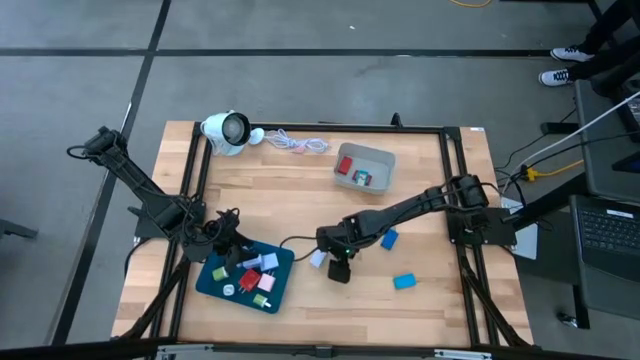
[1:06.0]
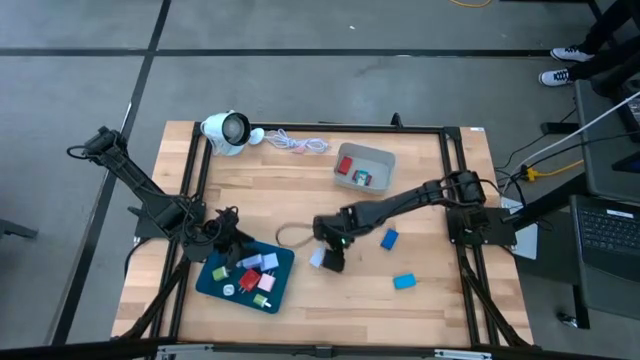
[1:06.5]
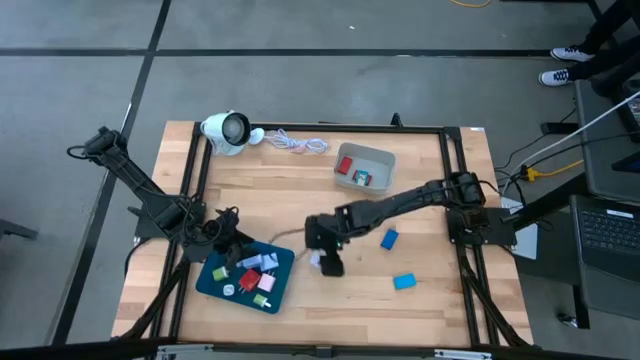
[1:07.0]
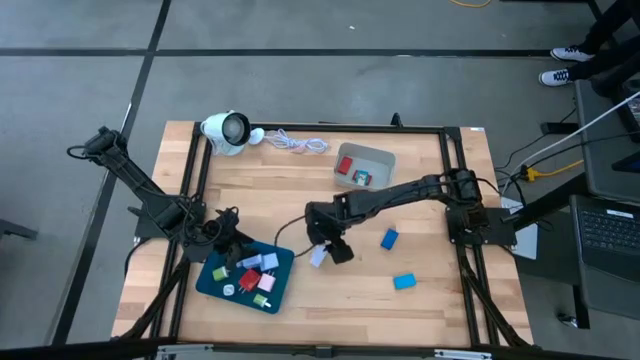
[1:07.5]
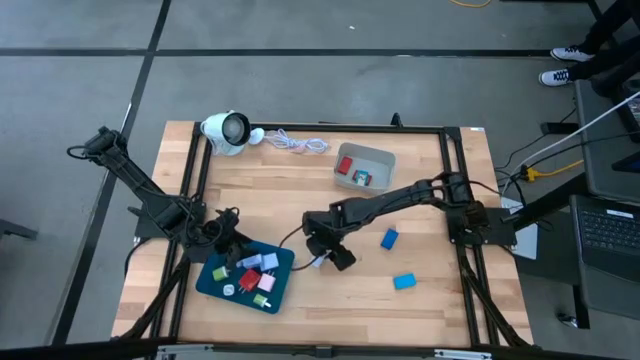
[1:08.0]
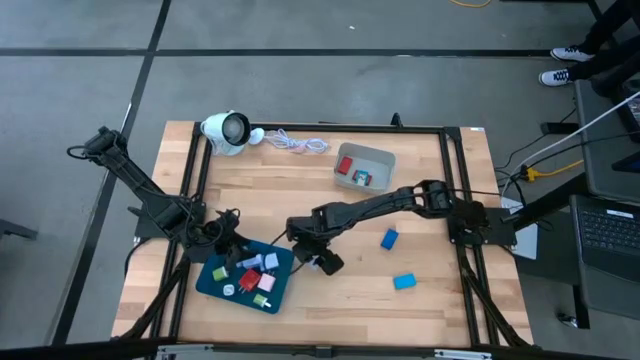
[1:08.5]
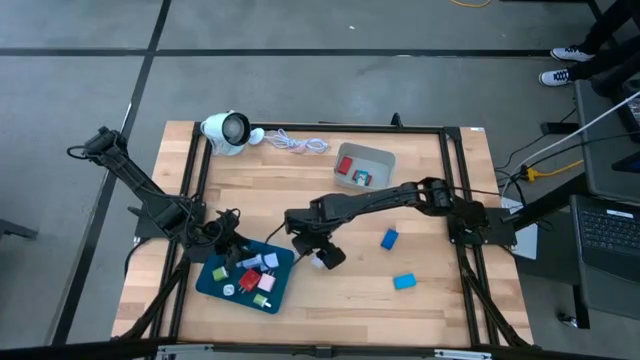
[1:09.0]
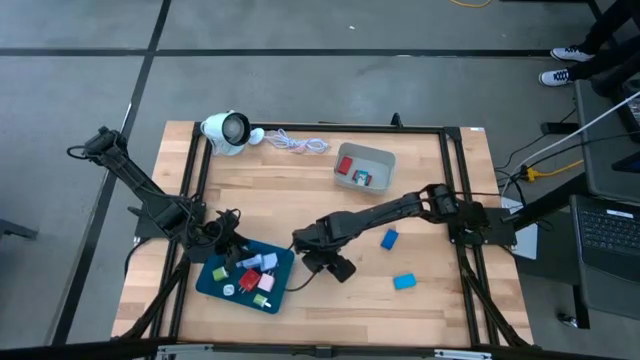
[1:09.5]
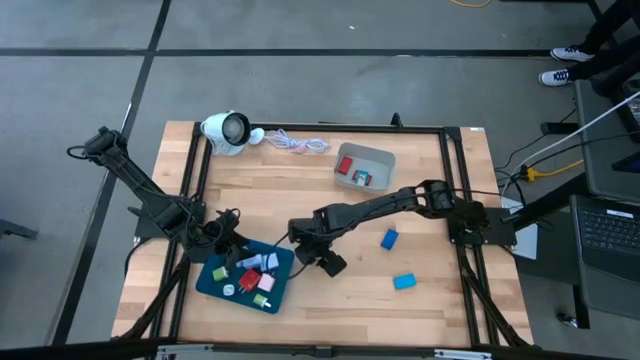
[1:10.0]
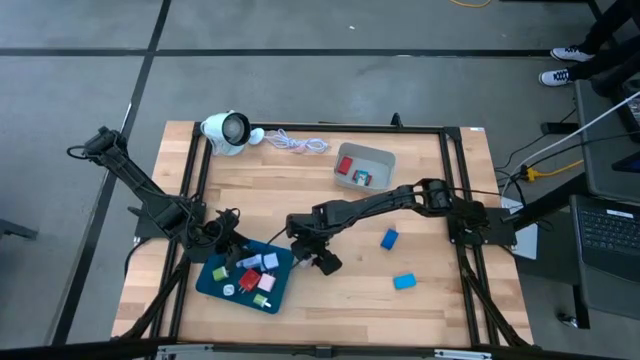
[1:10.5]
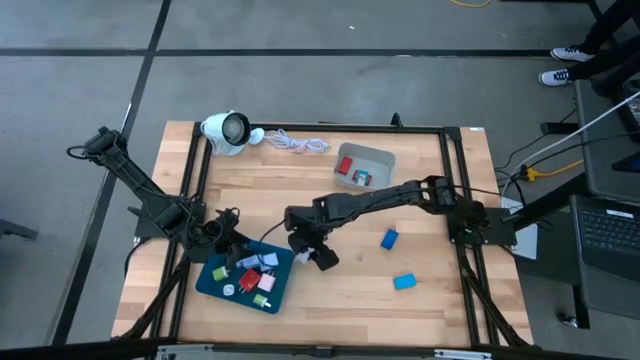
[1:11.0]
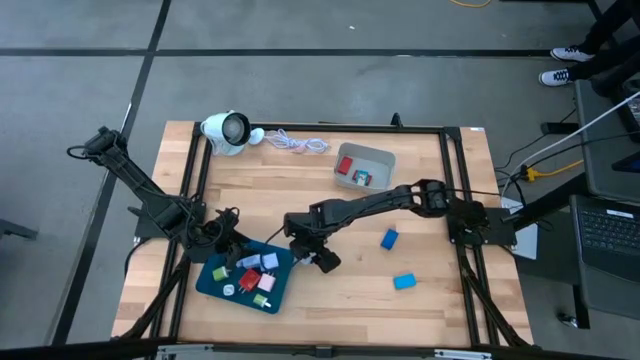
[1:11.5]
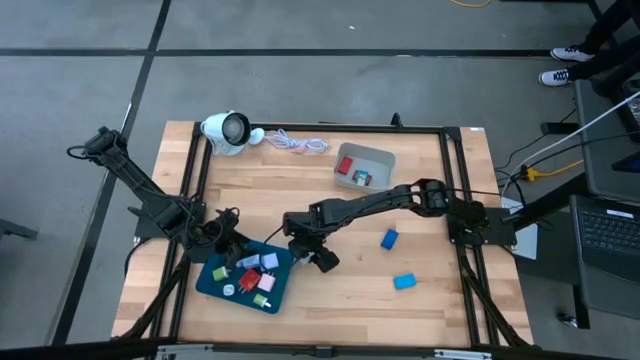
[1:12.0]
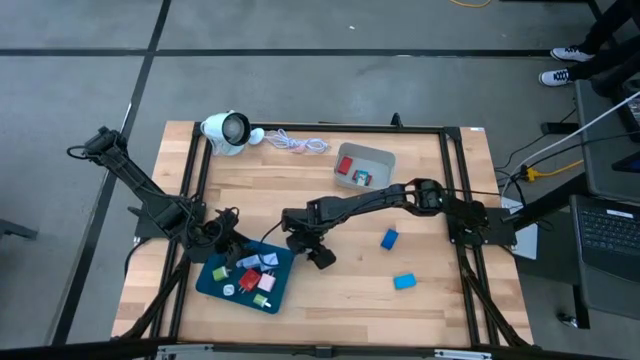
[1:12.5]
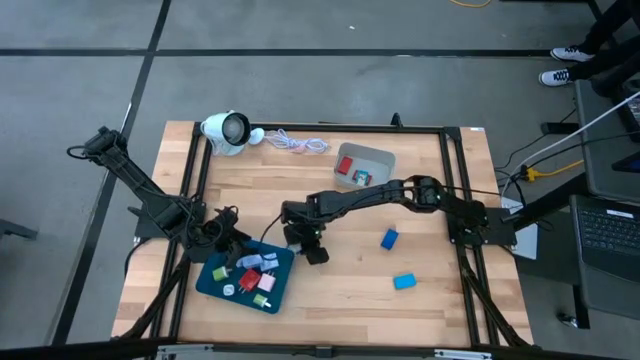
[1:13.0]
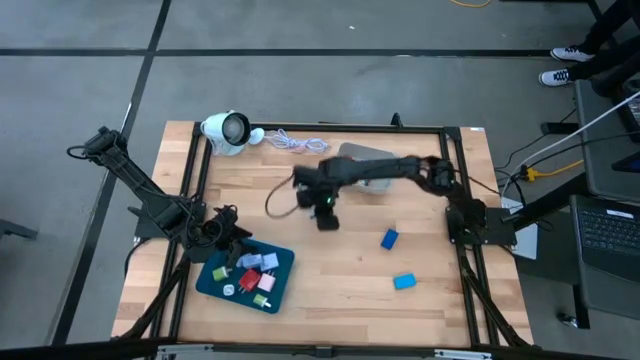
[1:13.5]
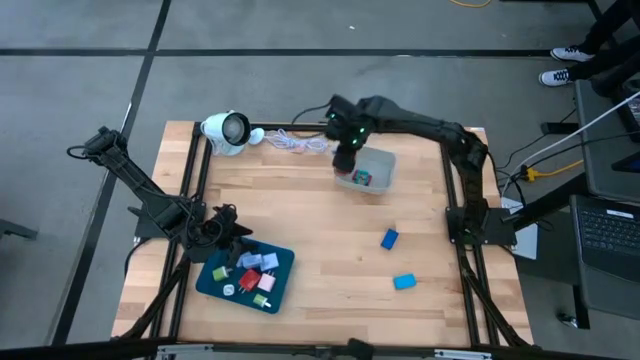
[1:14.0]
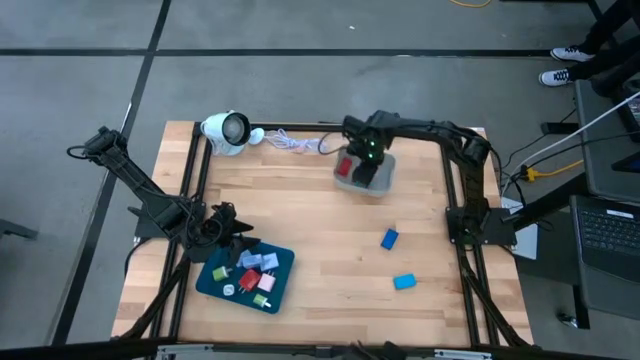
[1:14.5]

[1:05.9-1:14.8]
Task: Pick & Place Office items
Put the white digital clock into the gray bin

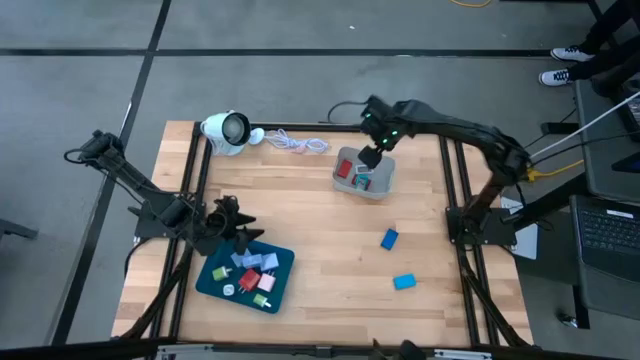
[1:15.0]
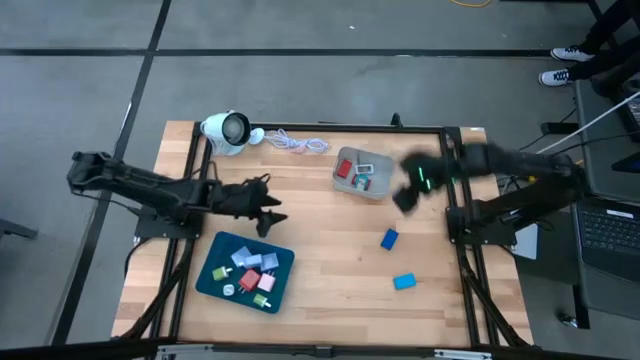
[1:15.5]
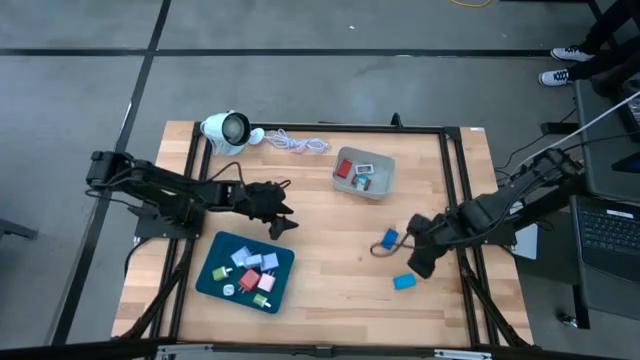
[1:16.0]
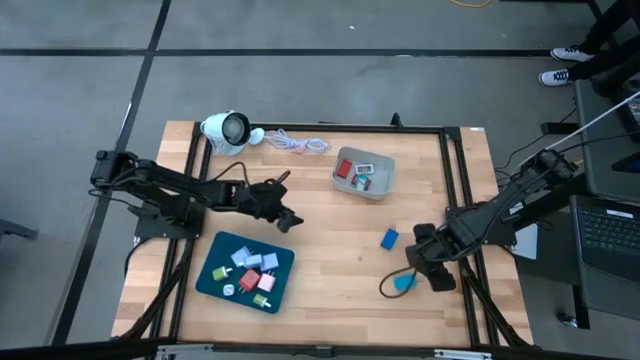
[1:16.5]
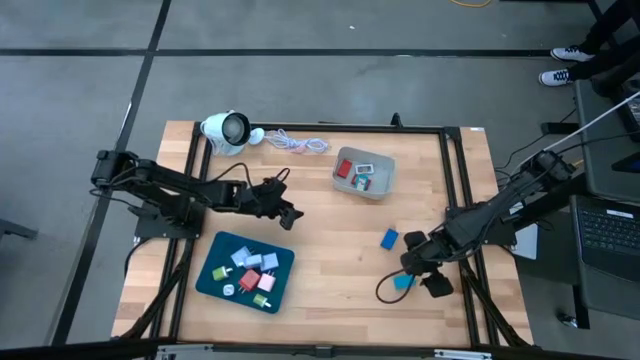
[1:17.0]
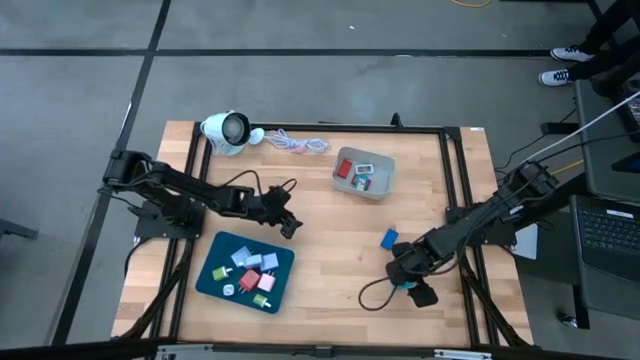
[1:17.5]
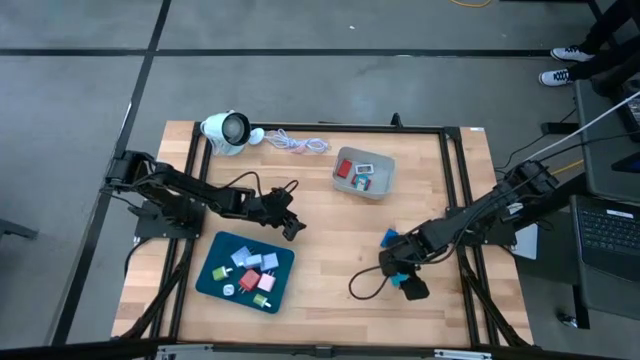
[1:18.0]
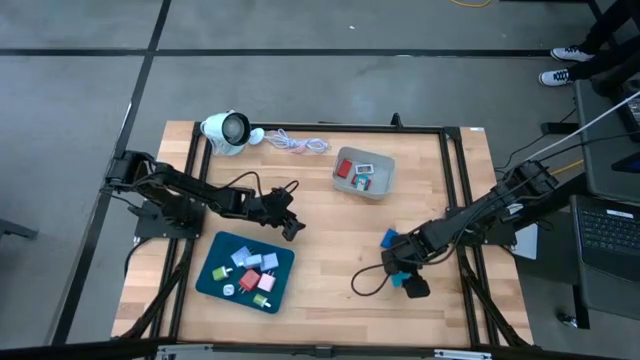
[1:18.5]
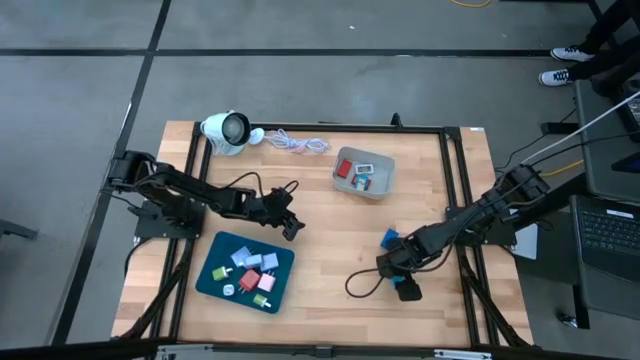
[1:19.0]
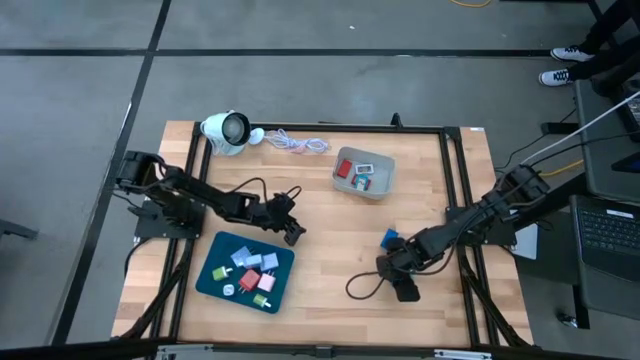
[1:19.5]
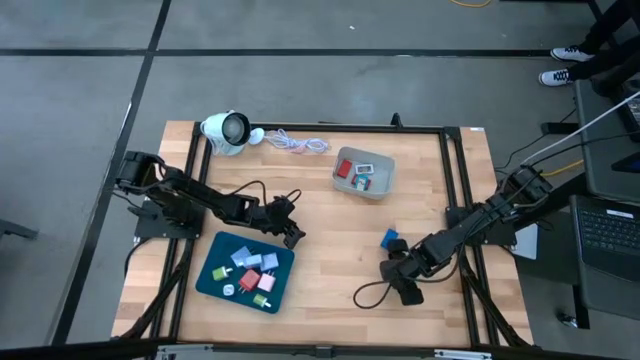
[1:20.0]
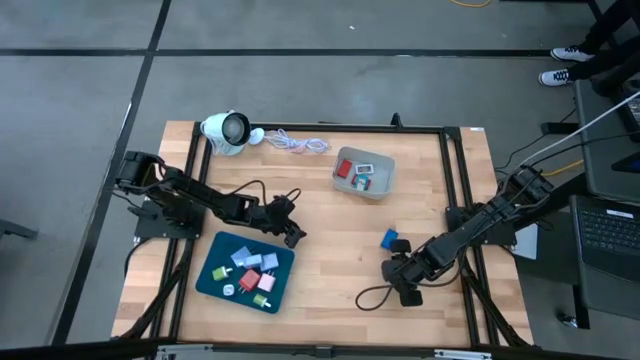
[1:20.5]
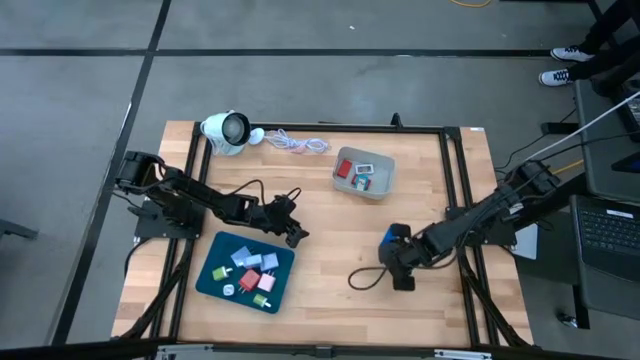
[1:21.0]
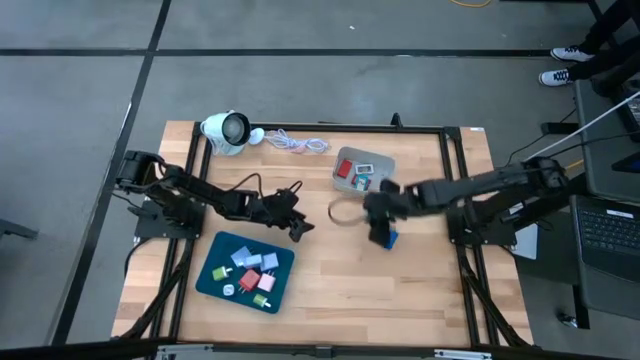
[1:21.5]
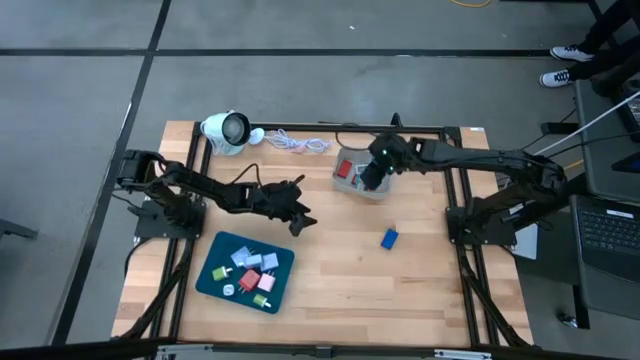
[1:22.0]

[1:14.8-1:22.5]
Put the light blue digital clock into the gray bin

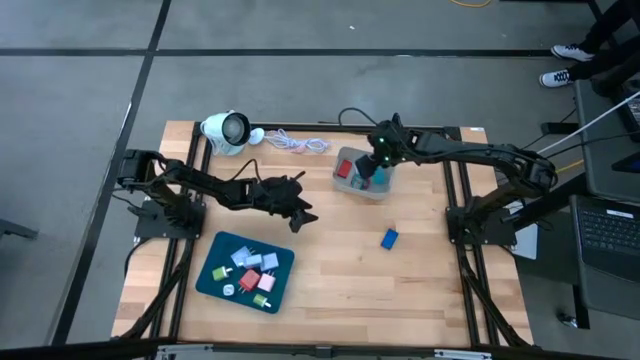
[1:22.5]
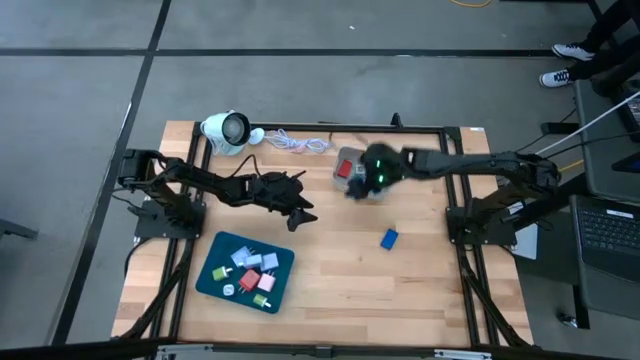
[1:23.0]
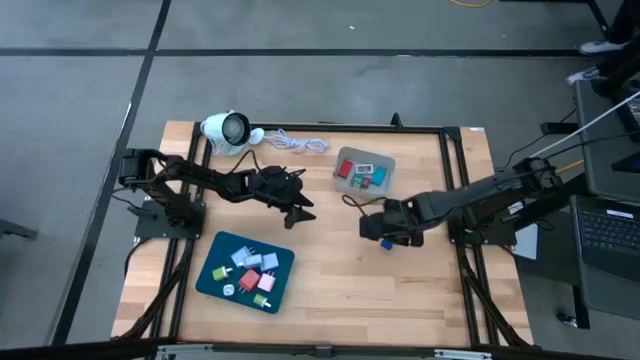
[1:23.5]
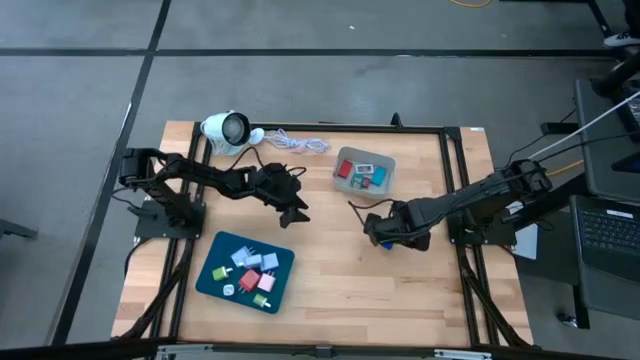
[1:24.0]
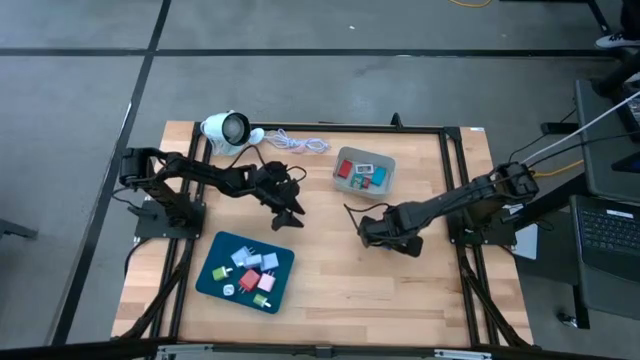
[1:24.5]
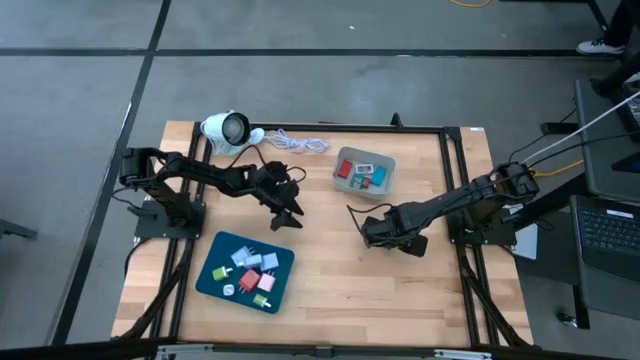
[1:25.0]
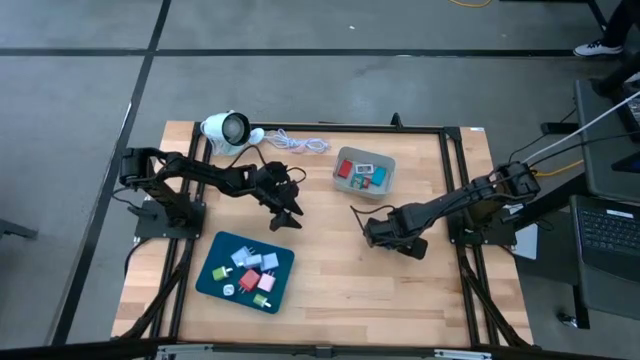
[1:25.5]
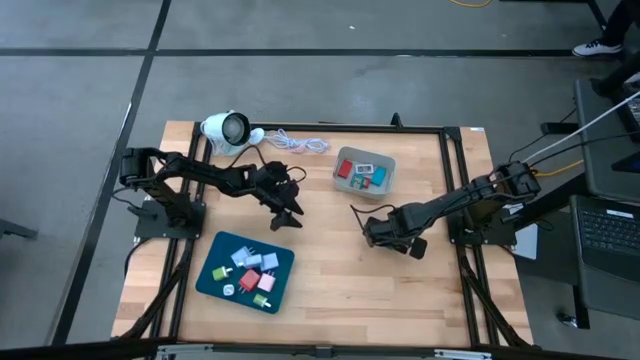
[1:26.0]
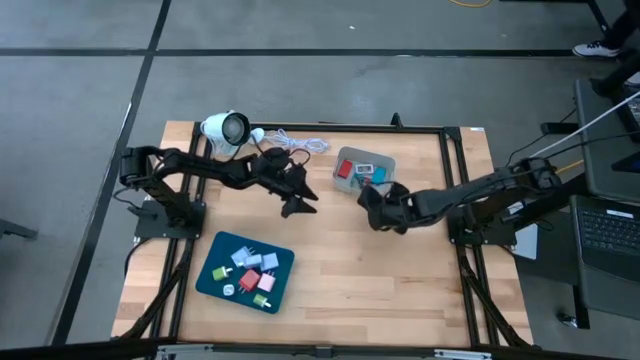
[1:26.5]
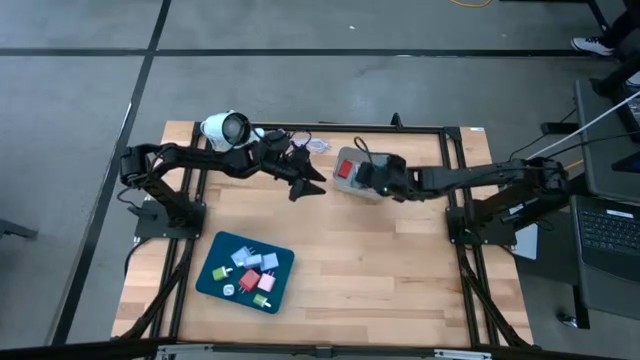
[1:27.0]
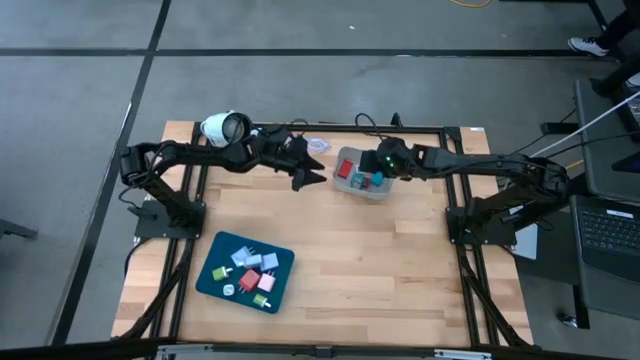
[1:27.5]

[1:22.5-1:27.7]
Put the blue digital clock into the gray bin
